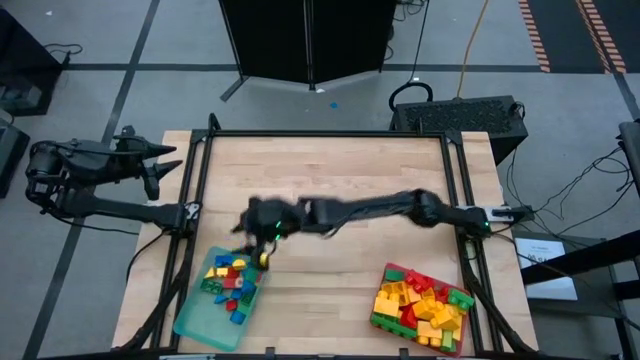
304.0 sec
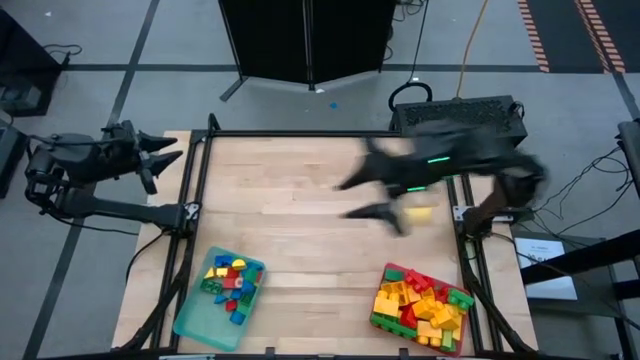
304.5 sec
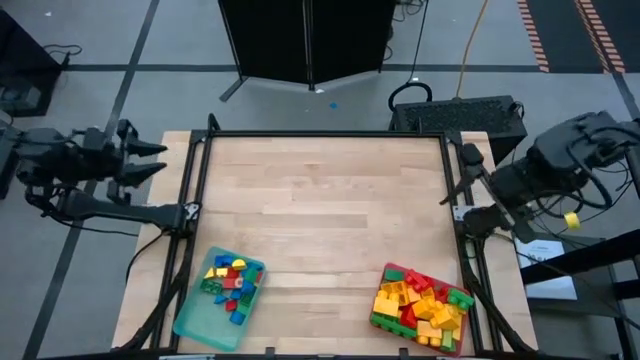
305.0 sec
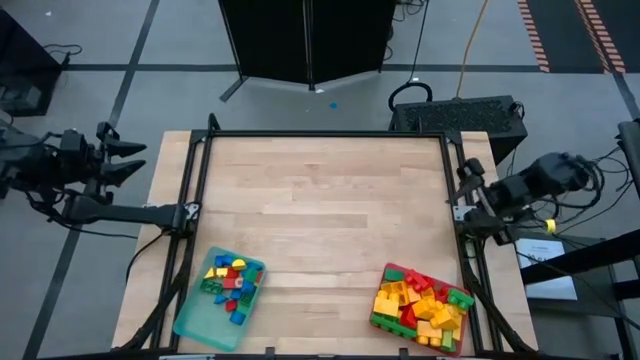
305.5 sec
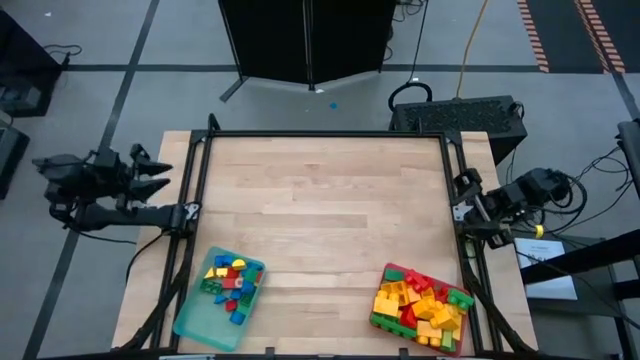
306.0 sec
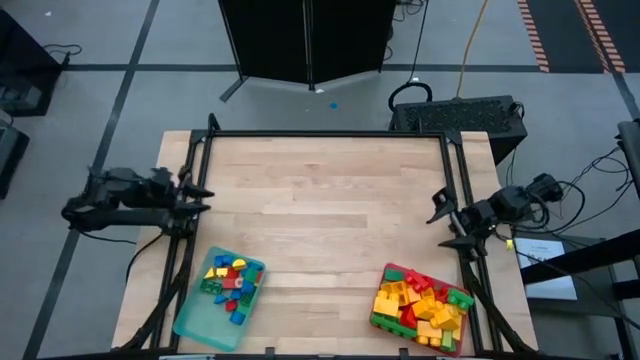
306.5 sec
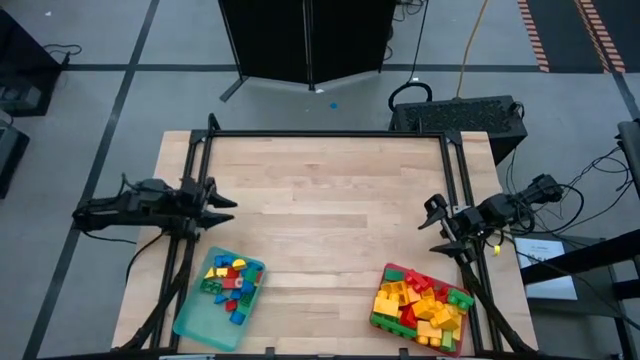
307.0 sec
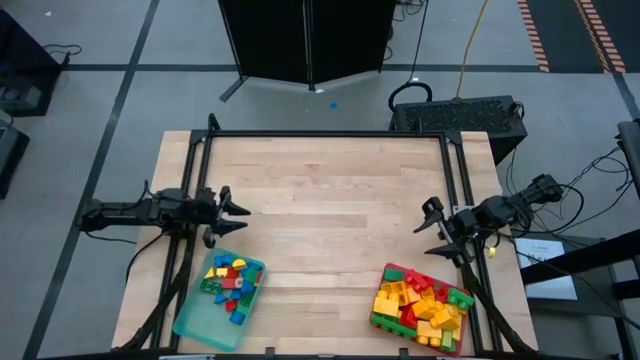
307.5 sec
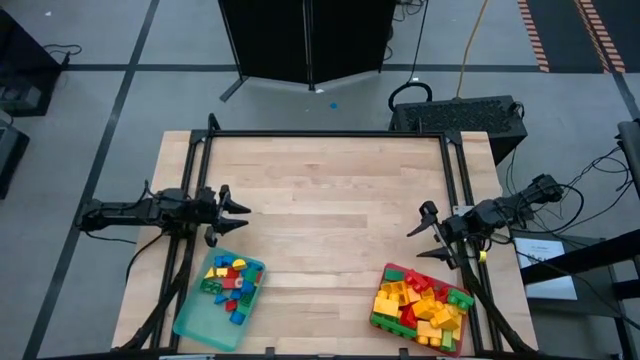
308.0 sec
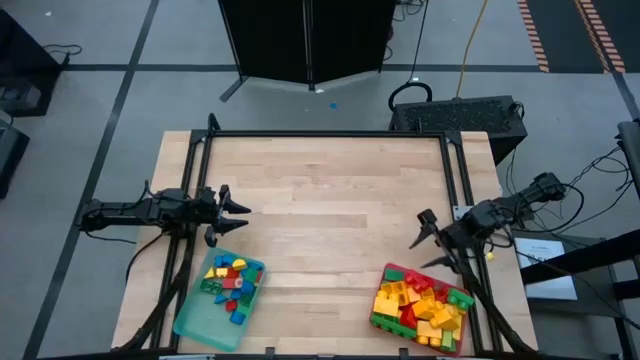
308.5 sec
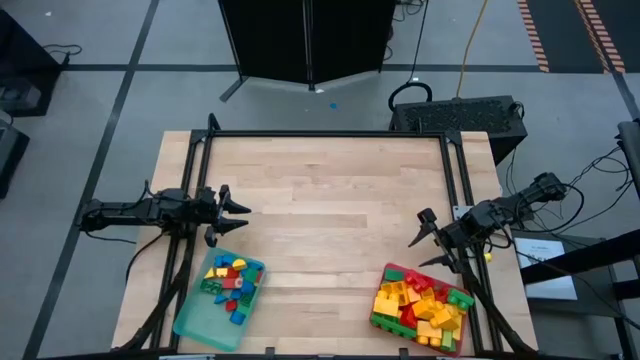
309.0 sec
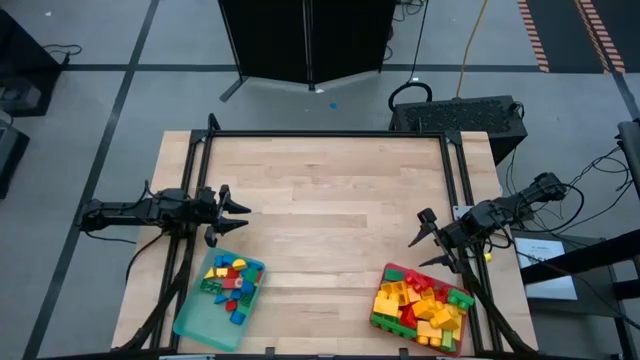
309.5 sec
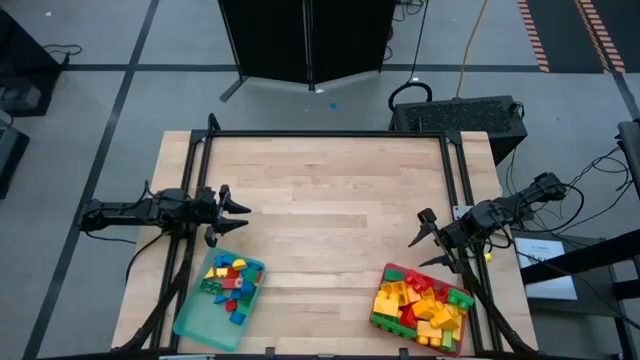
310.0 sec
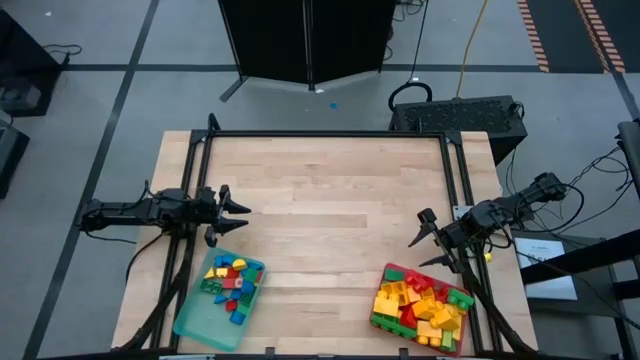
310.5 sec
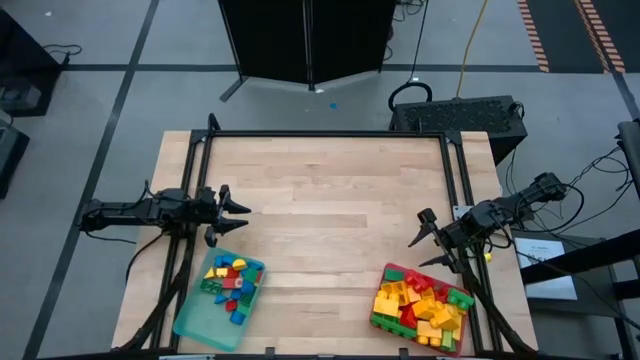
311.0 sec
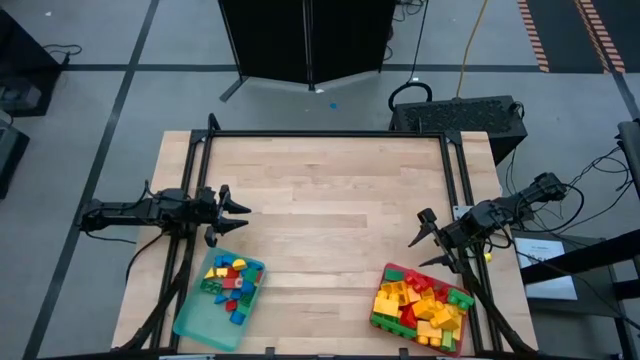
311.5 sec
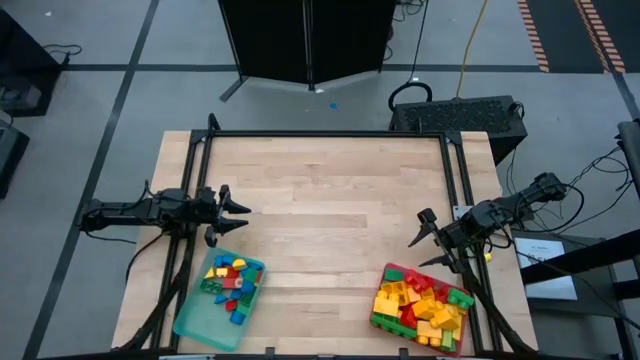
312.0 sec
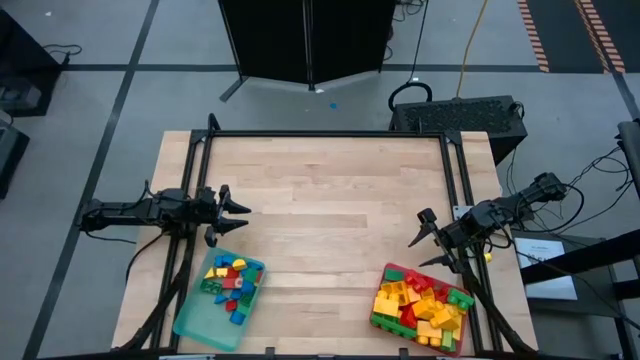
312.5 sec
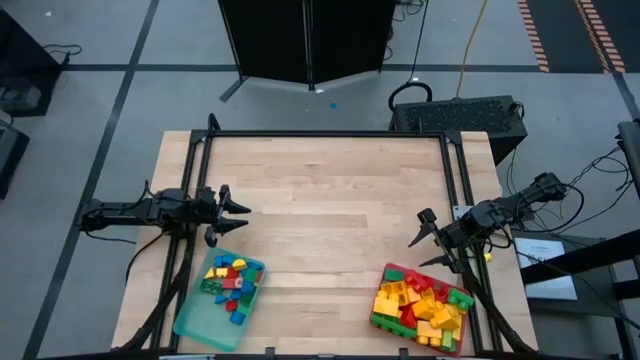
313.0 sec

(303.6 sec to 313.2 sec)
Task: Sort blocks by size
Return to Home Position

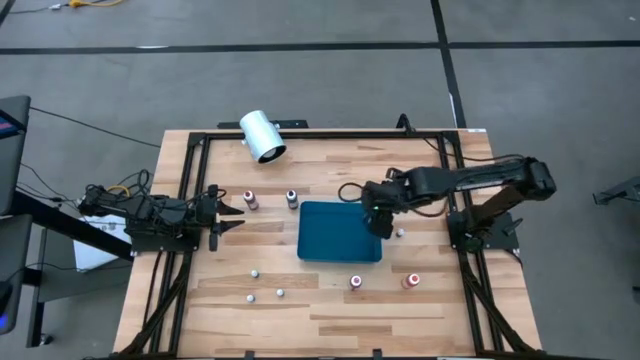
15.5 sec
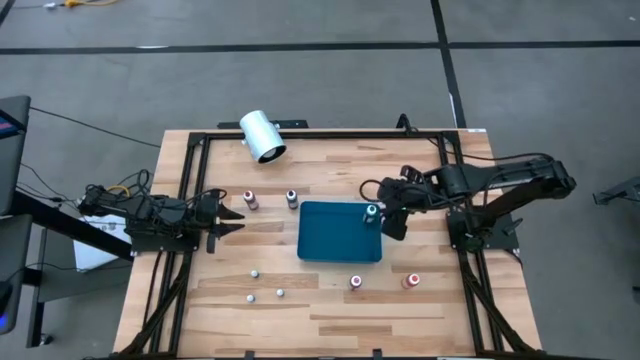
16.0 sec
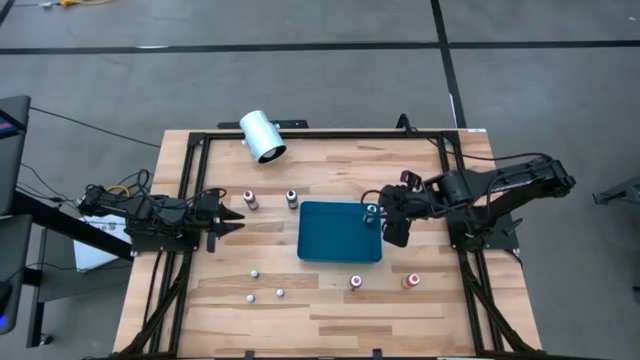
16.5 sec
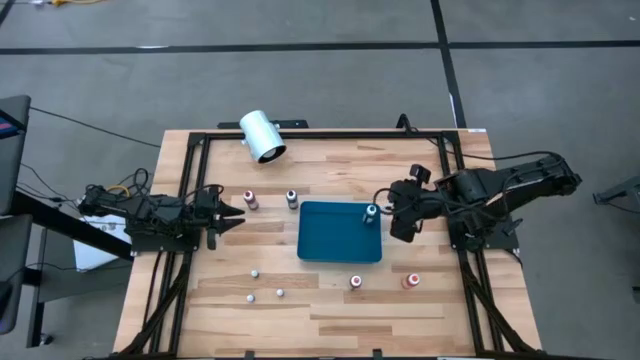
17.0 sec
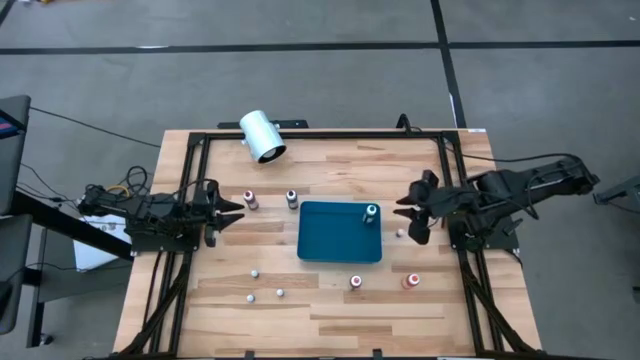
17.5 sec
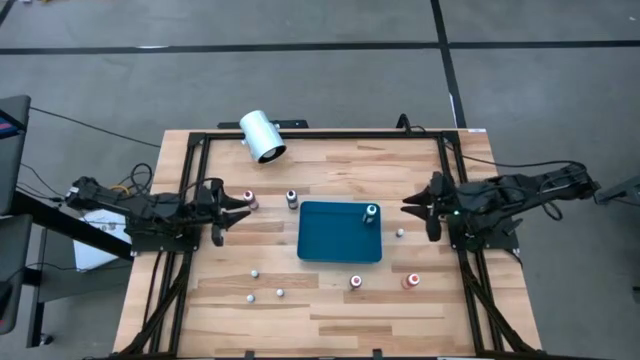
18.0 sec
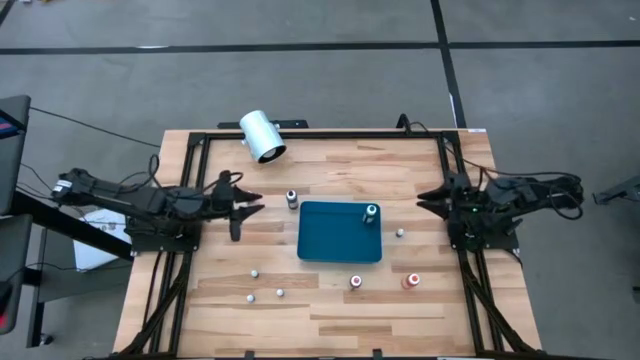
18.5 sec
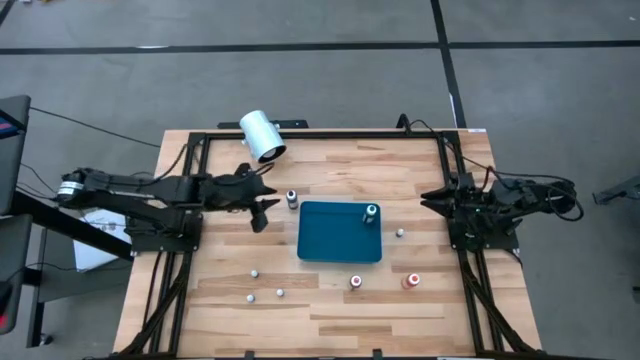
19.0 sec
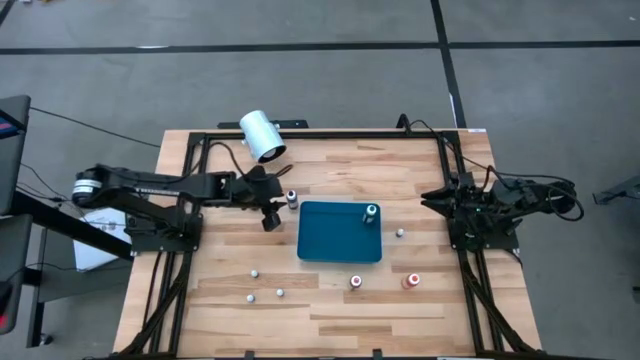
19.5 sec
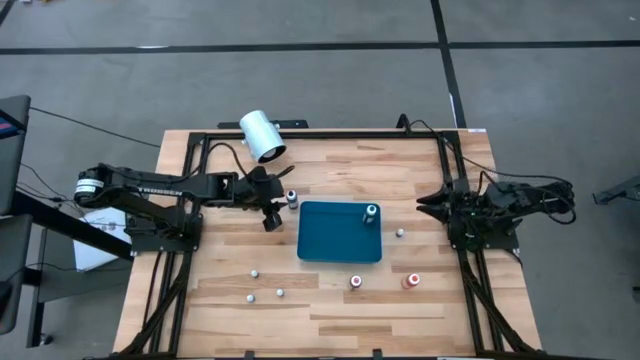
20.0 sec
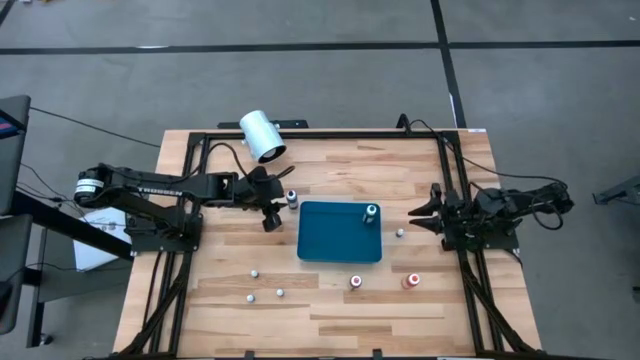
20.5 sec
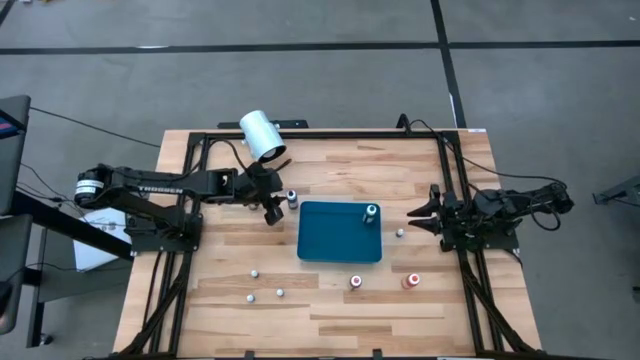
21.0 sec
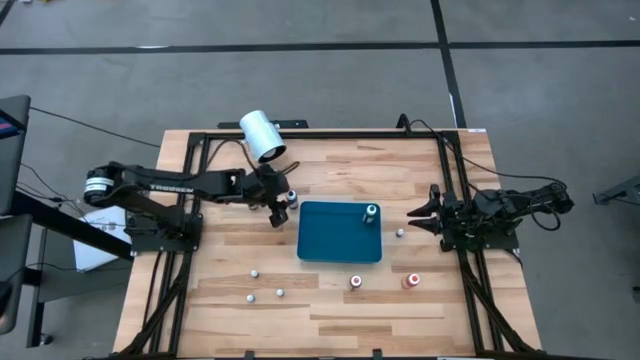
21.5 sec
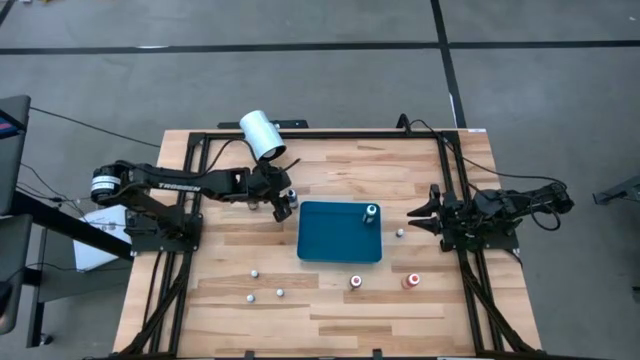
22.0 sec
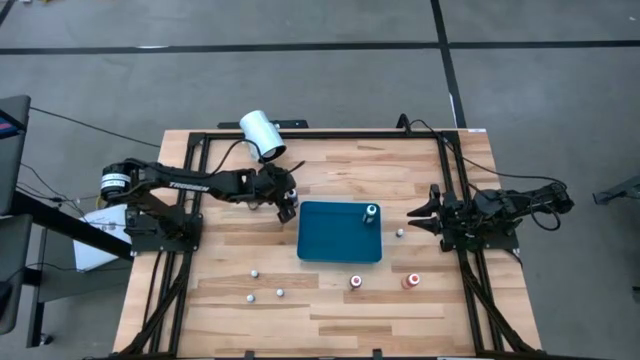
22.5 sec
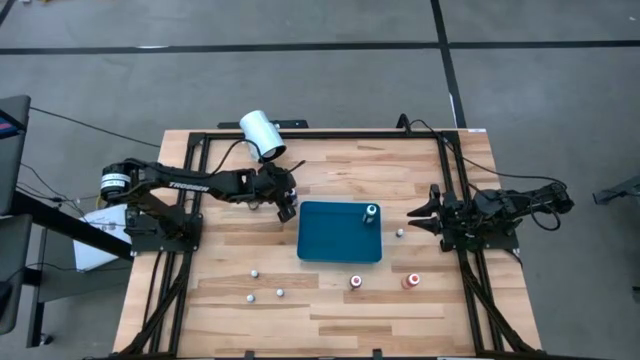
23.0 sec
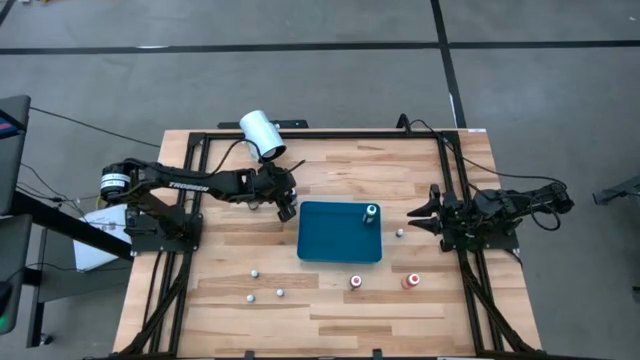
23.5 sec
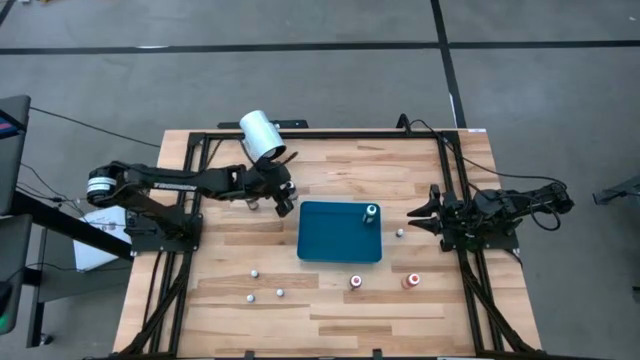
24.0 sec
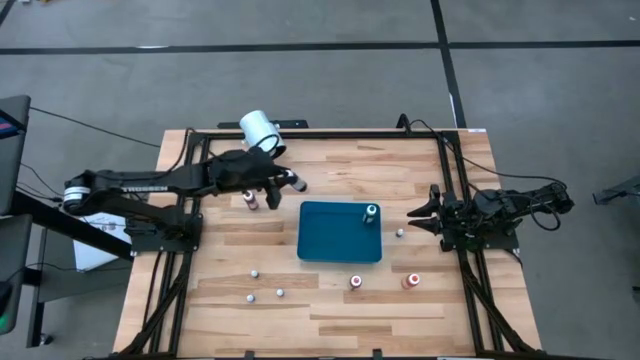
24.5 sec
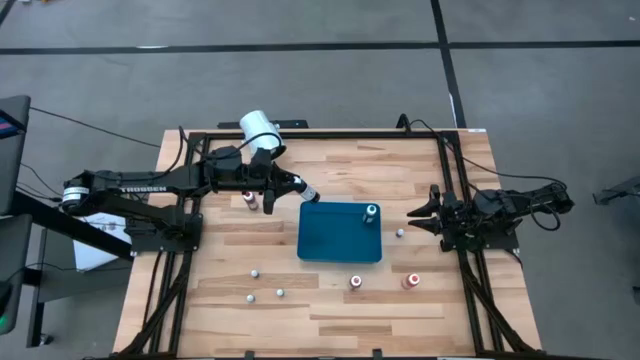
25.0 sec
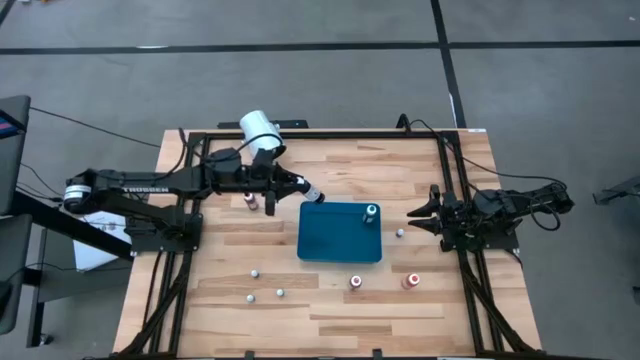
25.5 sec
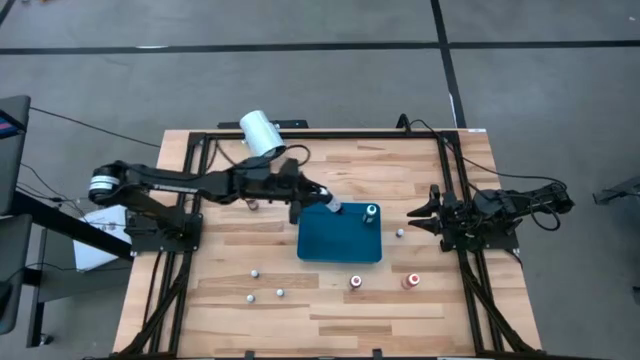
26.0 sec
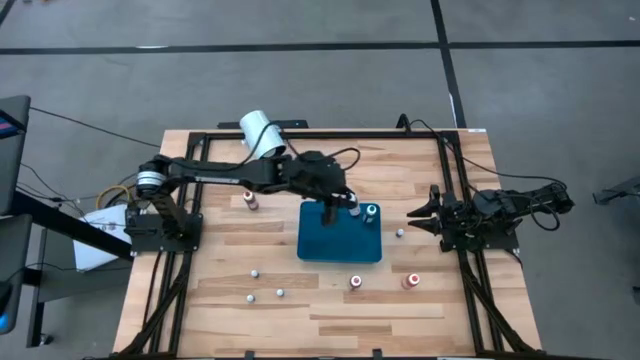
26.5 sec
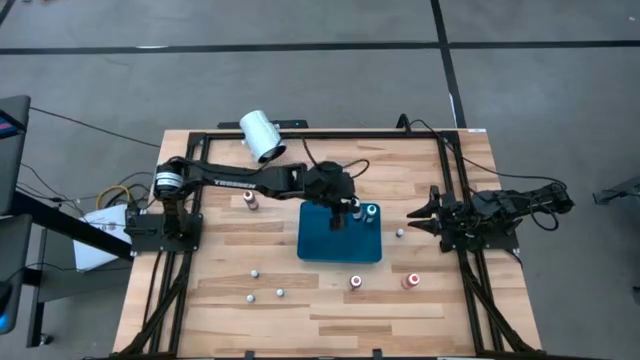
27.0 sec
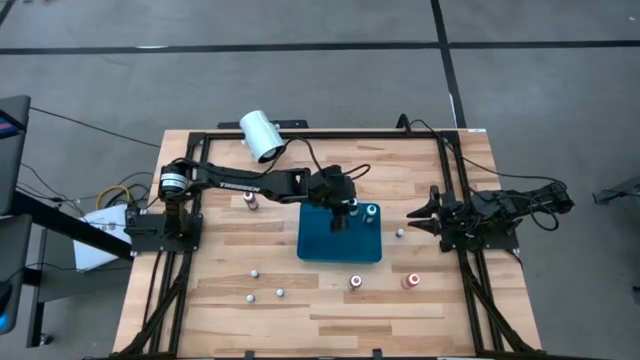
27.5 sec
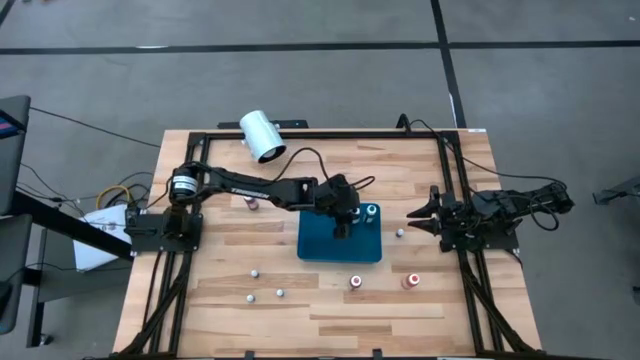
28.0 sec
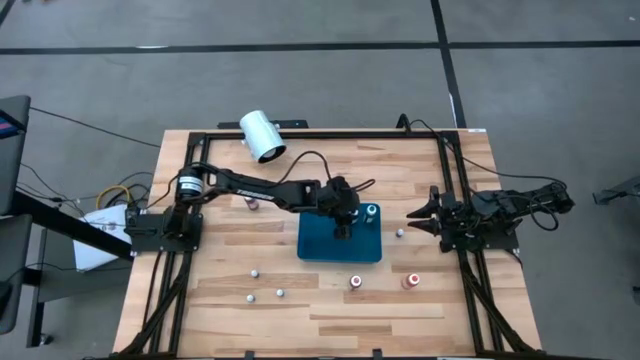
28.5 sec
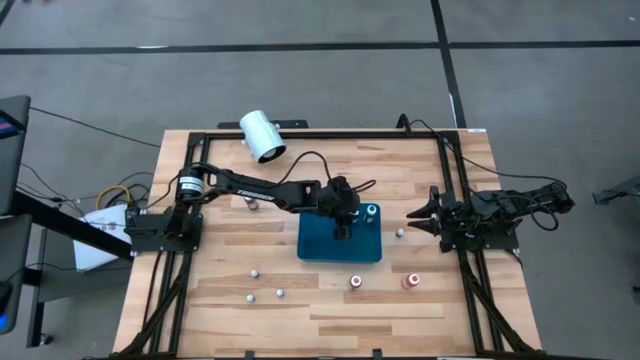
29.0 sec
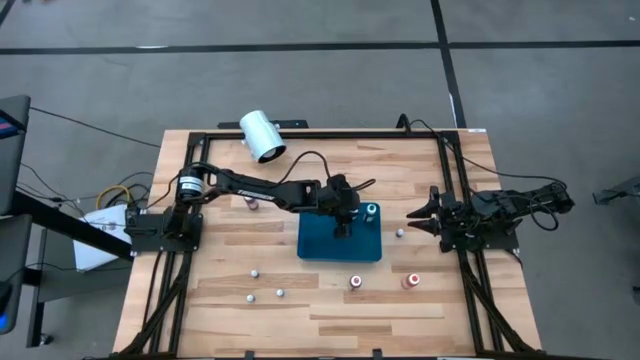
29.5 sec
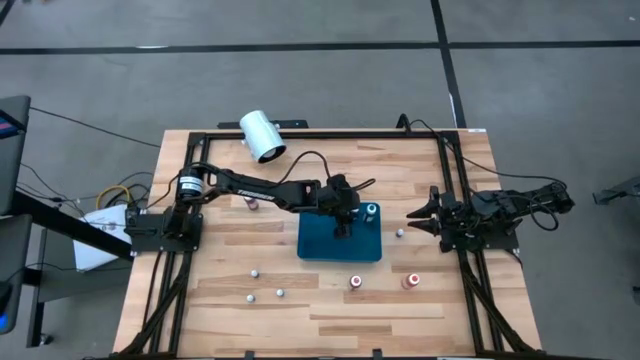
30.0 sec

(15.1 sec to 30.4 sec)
Task: Pick & Place food coloring
Put the large black food coloring bottle into the blue bin
